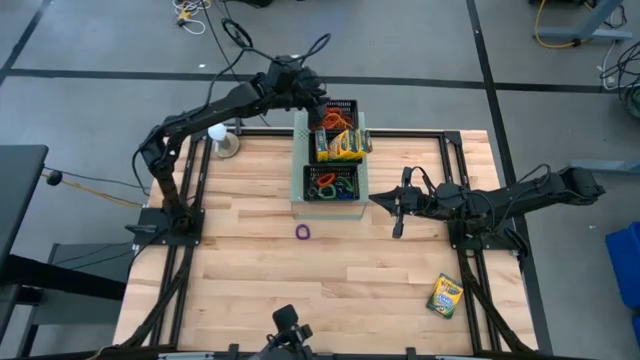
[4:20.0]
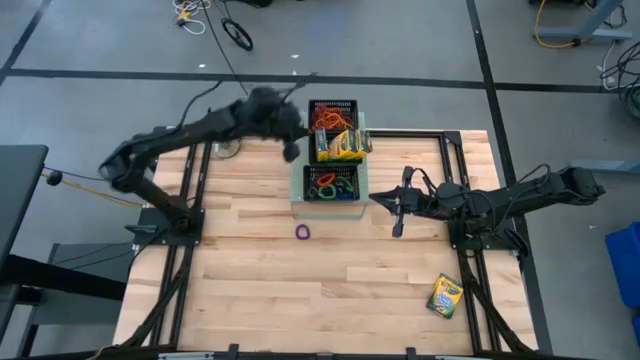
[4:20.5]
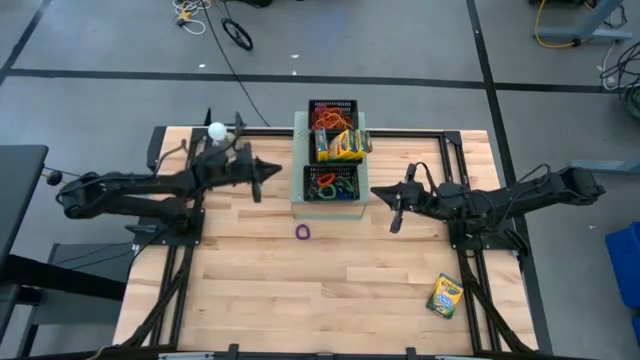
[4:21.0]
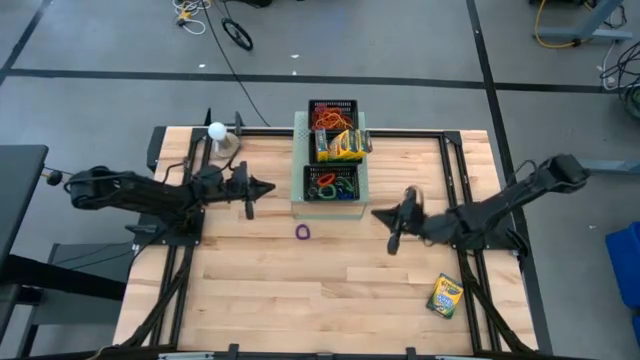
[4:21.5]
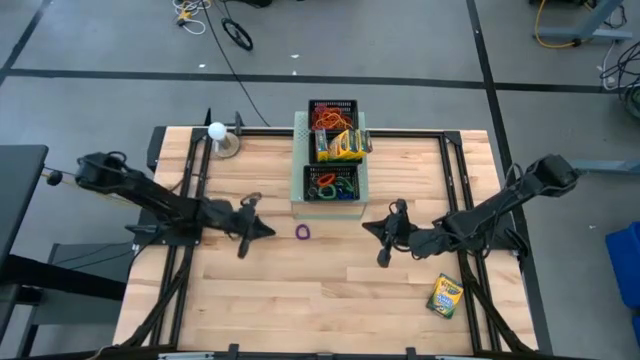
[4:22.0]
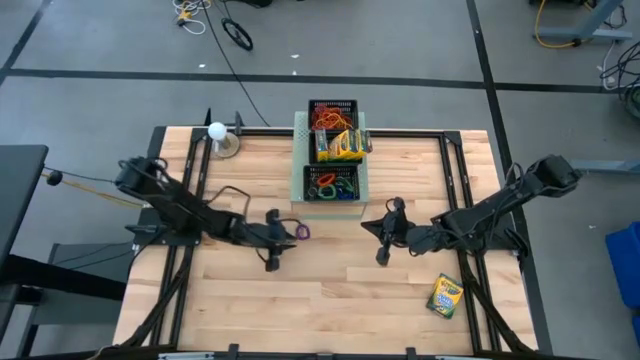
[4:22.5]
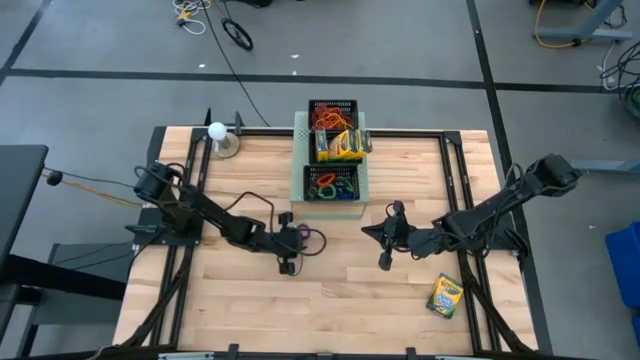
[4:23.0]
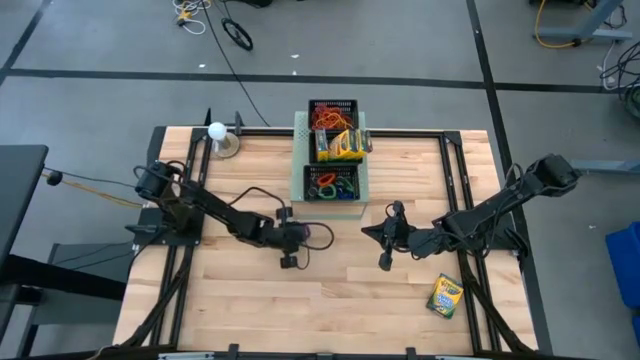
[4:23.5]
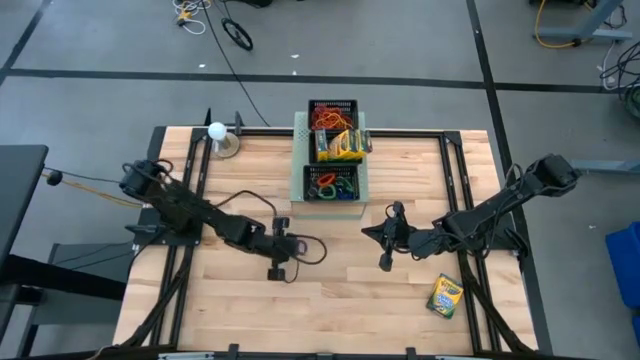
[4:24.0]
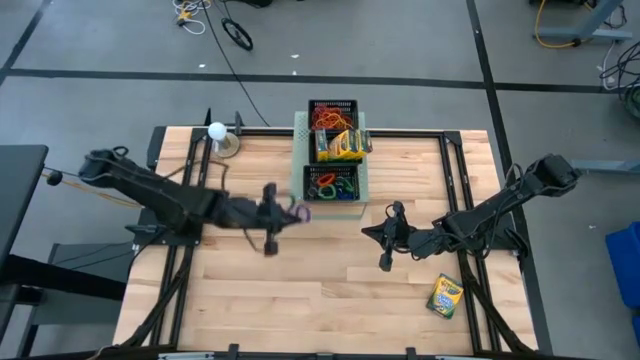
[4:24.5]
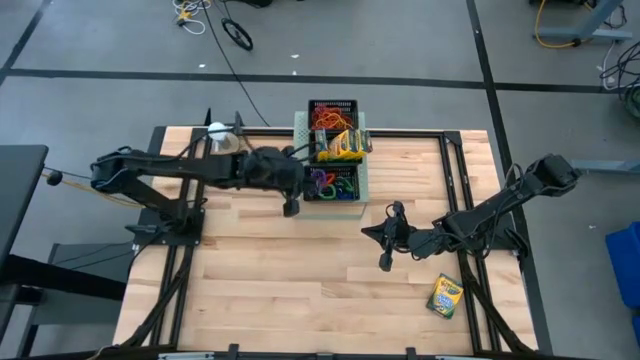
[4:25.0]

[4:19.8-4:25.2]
Task: Pick & Place Office Desk Supplies
Put the violet spring keychain into the bottom black bin on the shelf

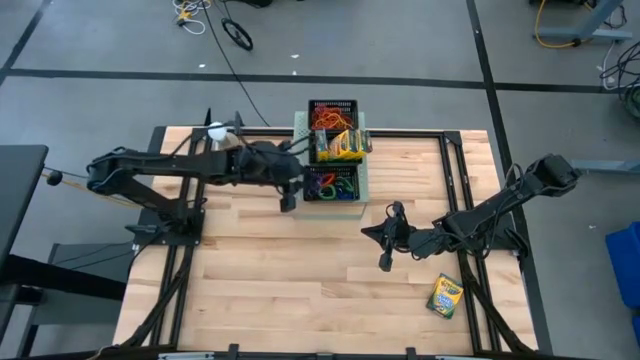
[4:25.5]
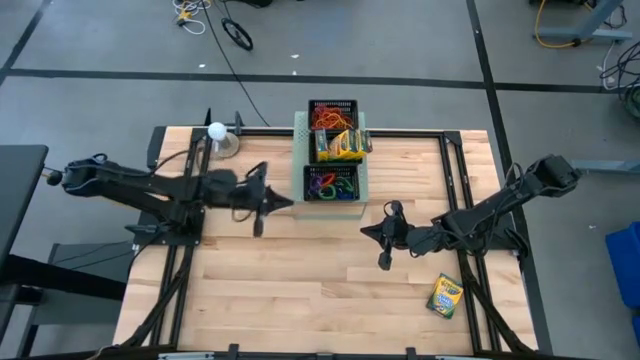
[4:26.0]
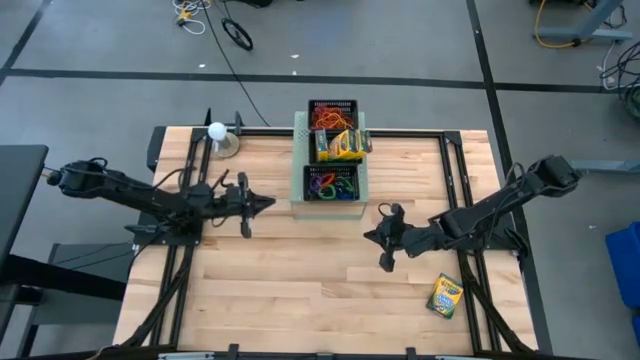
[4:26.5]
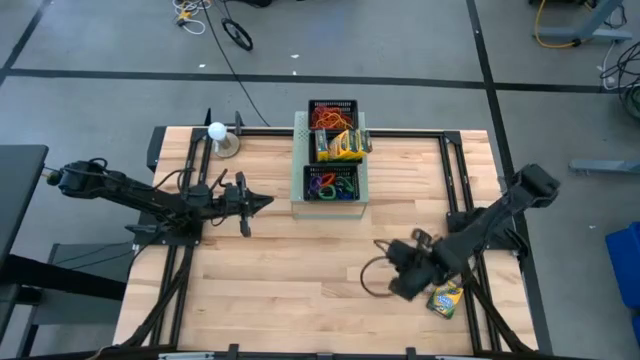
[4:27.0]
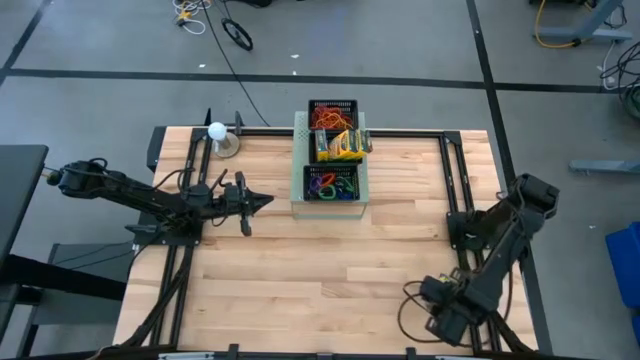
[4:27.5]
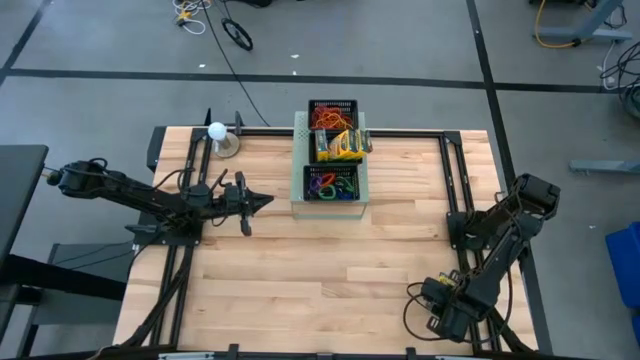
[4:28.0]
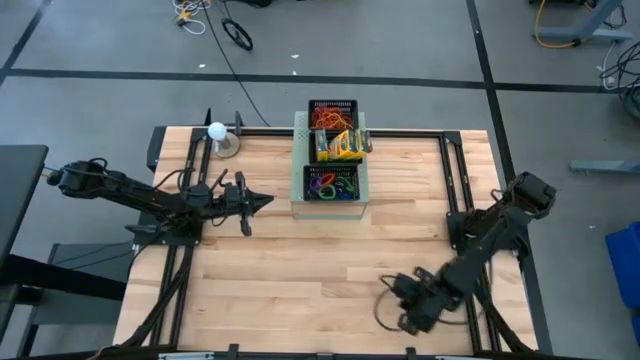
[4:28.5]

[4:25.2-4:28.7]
Put the yellow crayon box into the middle black bin on the shelf

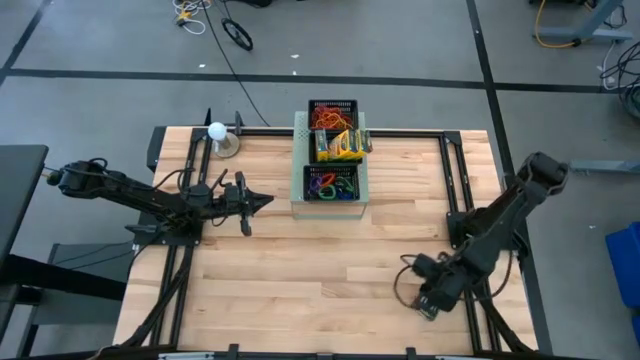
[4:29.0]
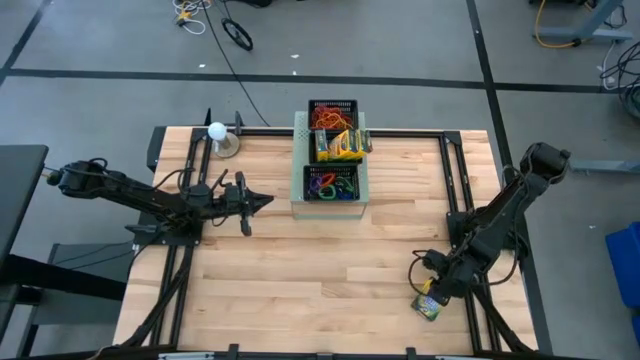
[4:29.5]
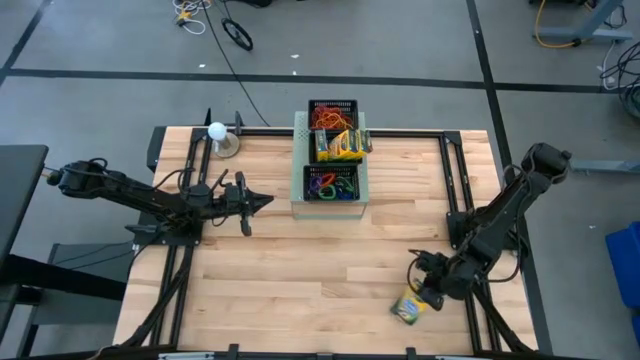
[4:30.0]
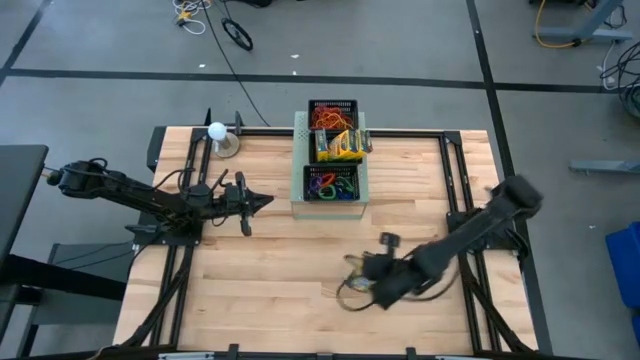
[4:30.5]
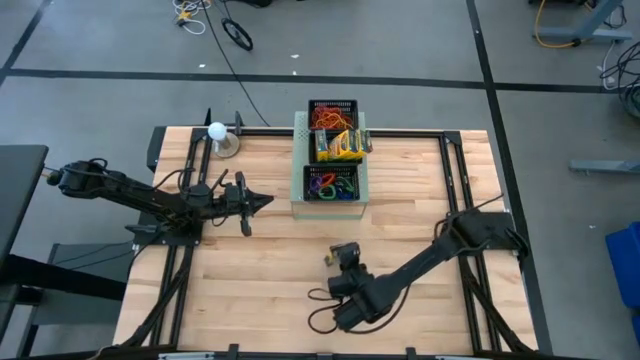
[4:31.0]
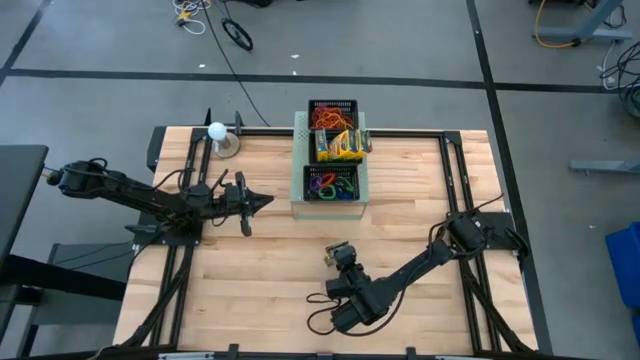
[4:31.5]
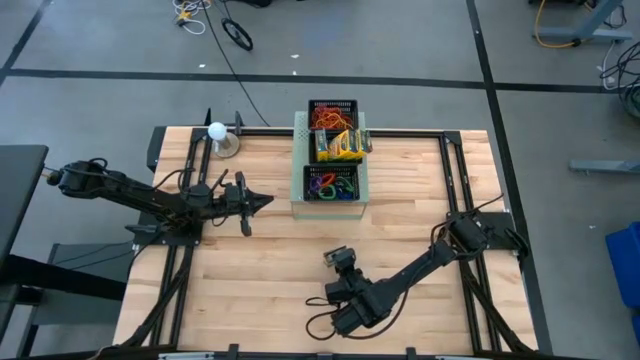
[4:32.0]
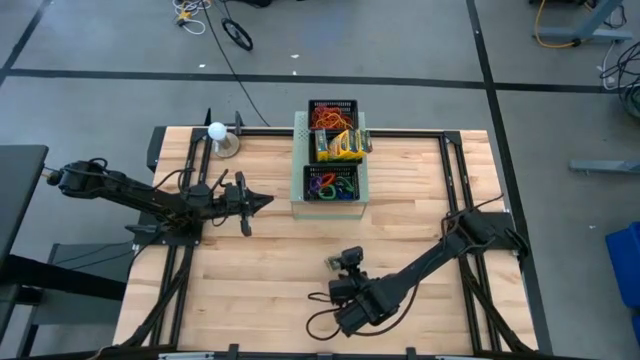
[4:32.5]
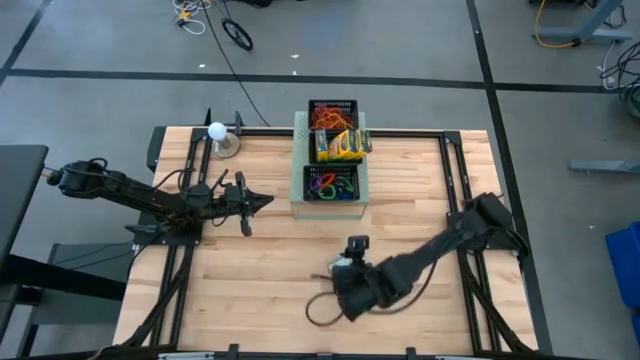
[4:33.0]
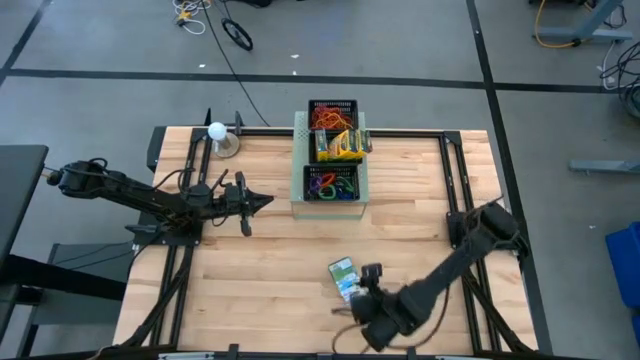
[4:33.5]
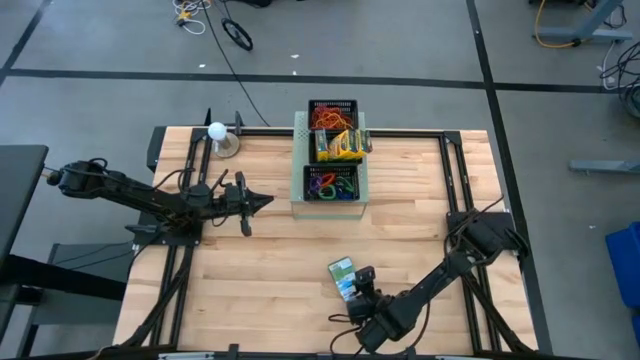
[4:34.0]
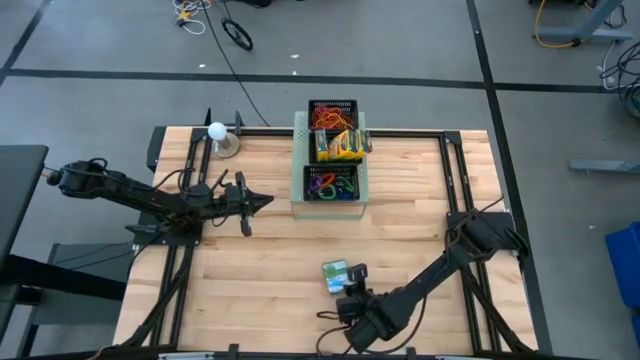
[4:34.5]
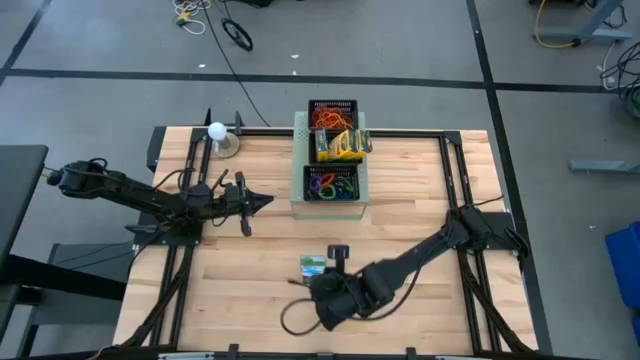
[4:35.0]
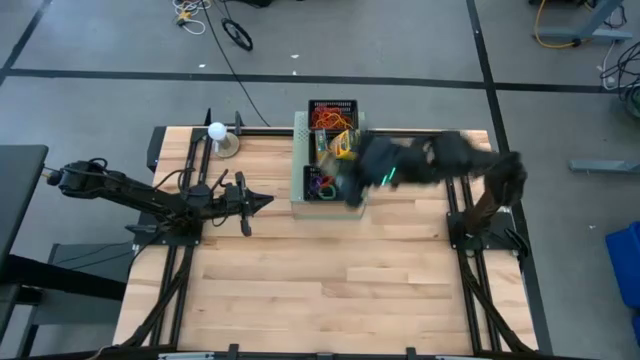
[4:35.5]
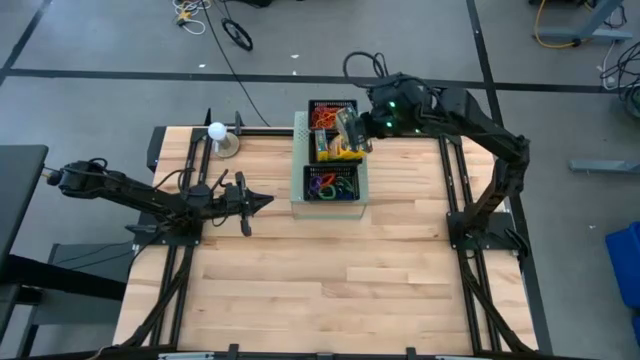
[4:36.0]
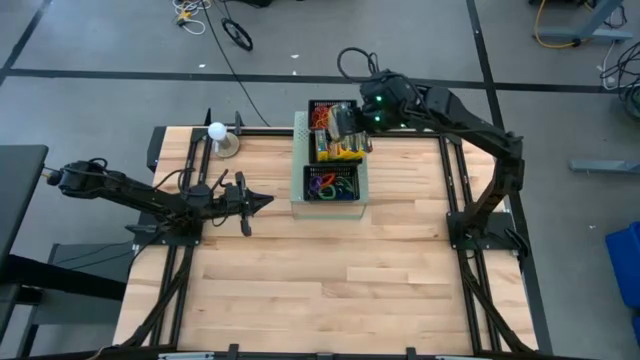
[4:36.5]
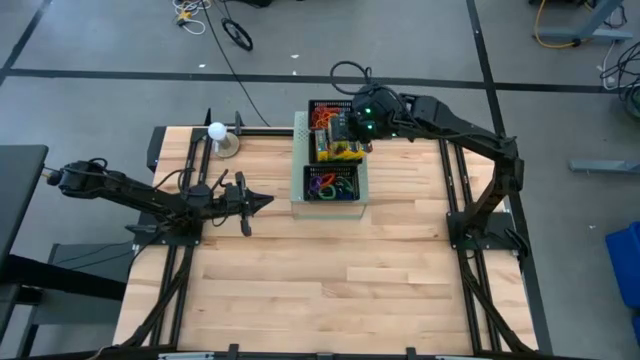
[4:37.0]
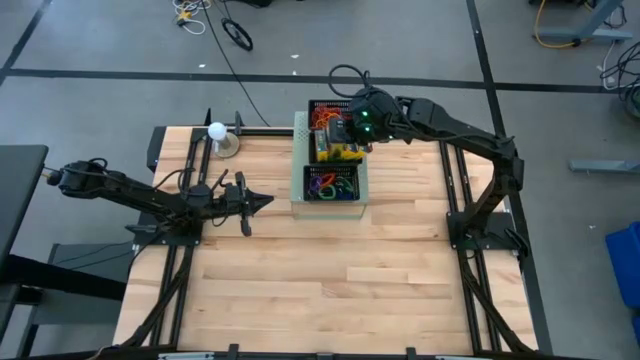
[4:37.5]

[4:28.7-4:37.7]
Put the yellow crayon box into the middle black bin on the shelf

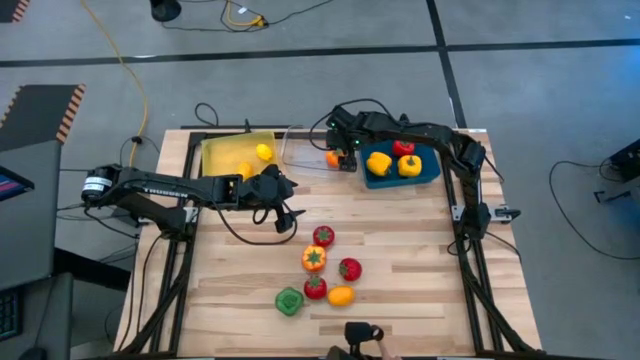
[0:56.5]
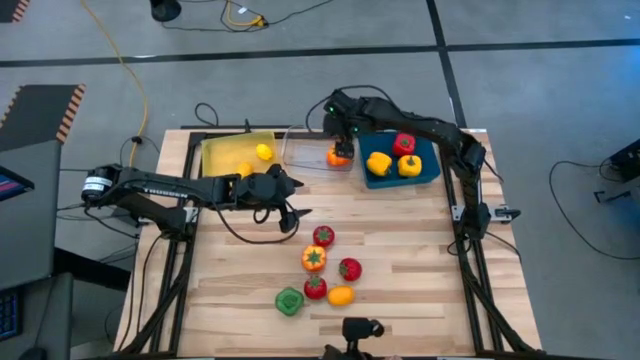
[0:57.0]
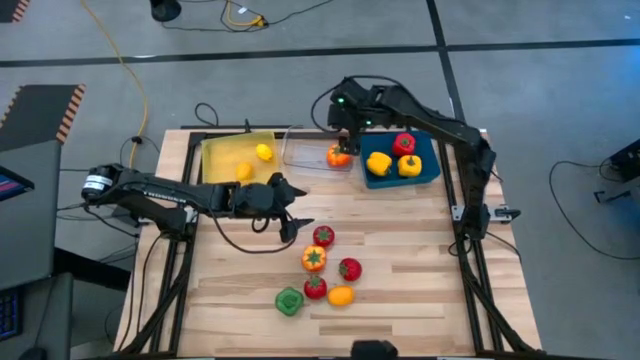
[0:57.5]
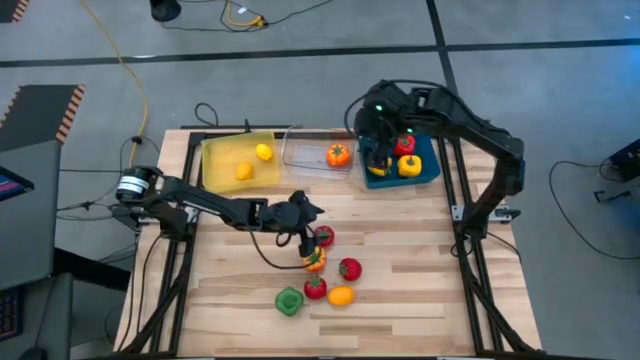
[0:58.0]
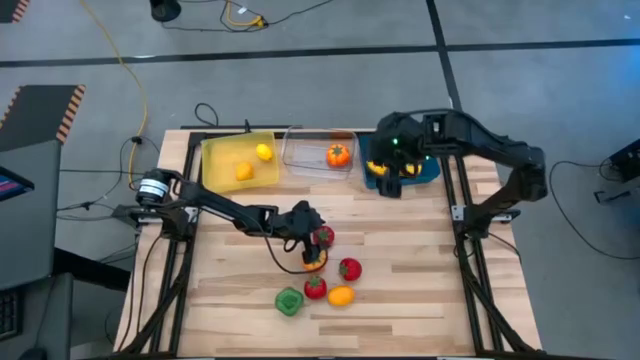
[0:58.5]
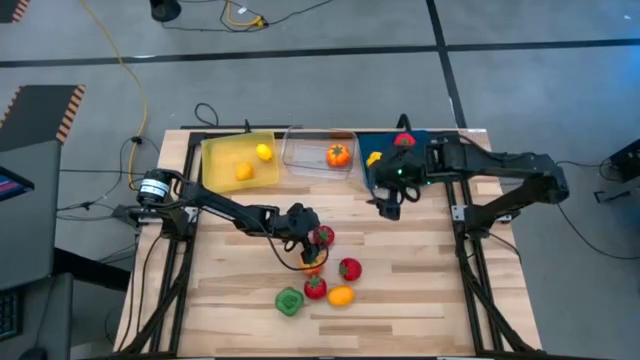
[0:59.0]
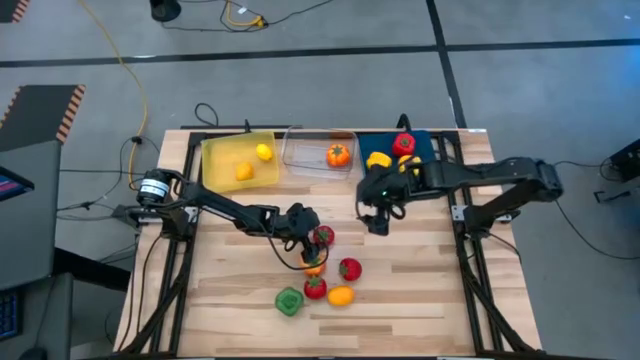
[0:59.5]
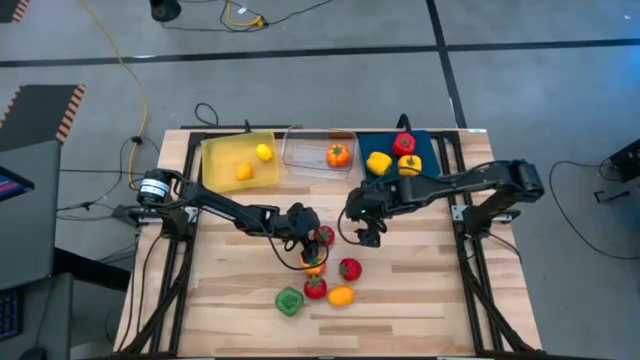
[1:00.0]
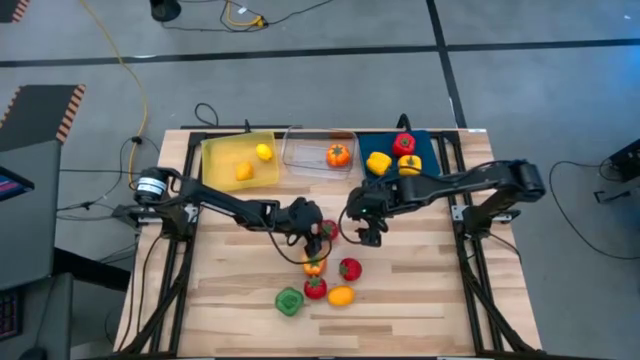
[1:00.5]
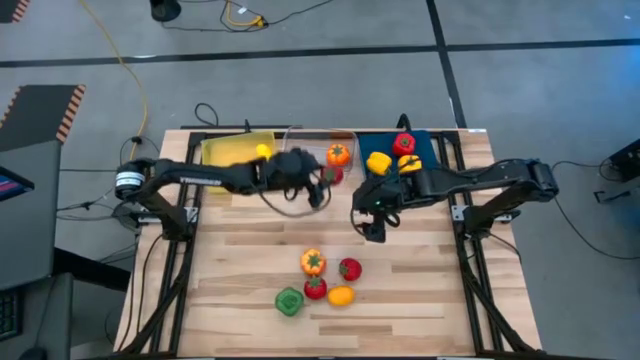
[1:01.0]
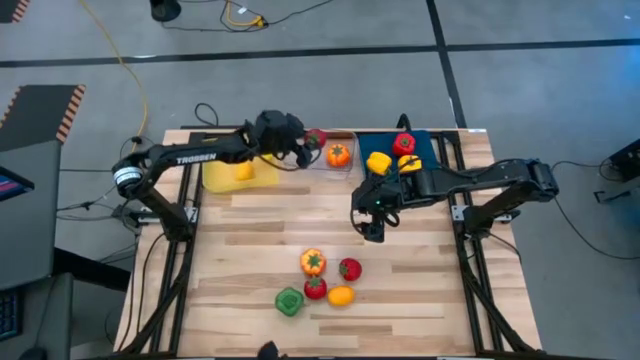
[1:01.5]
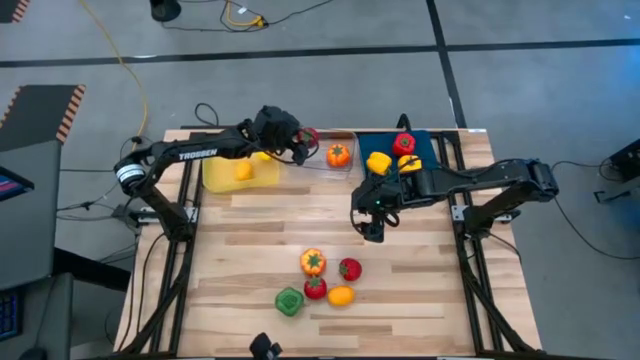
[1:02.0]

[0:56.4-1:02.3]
Task: Sort produce into baskets
Put the top left red tomato into the transparent bin
